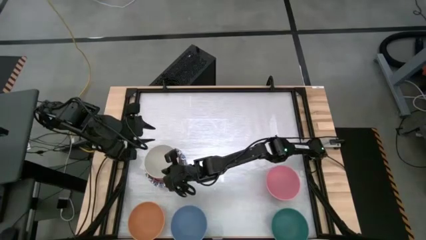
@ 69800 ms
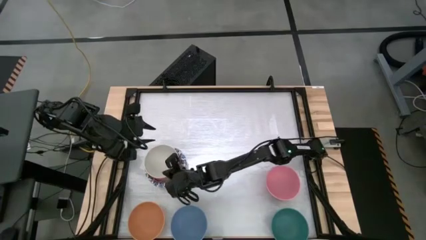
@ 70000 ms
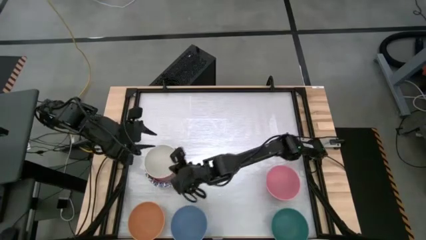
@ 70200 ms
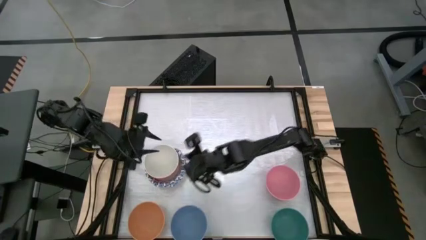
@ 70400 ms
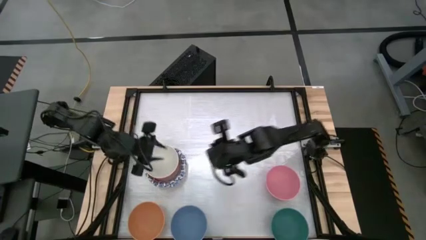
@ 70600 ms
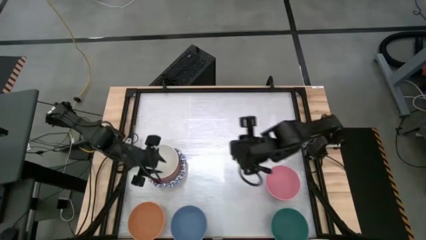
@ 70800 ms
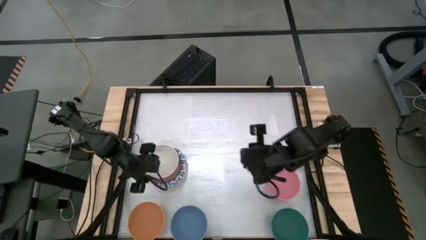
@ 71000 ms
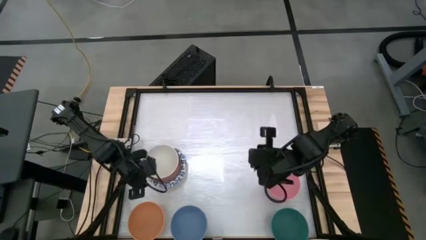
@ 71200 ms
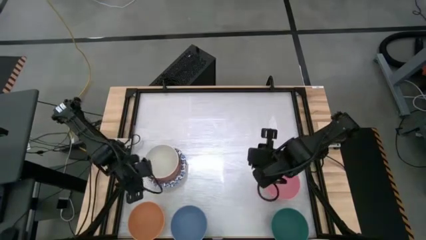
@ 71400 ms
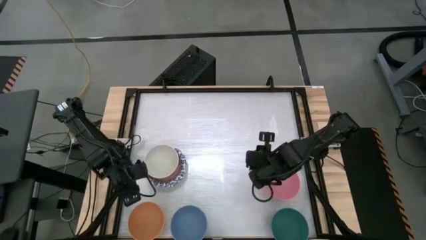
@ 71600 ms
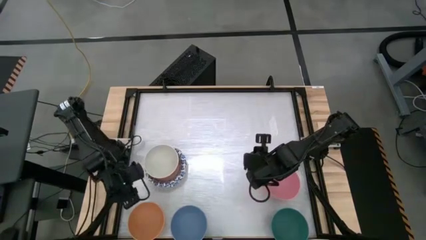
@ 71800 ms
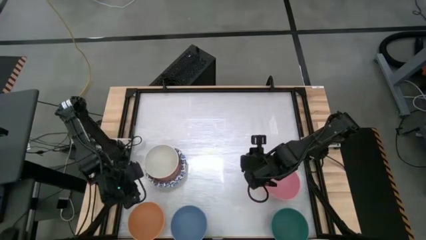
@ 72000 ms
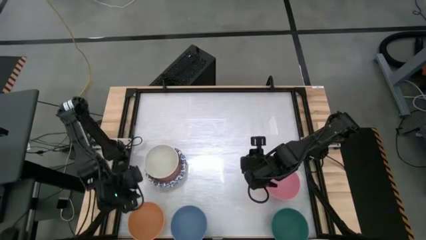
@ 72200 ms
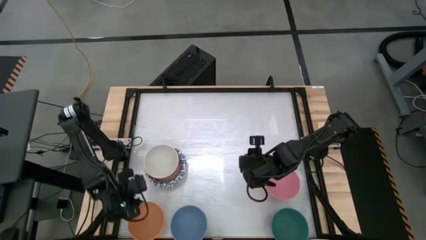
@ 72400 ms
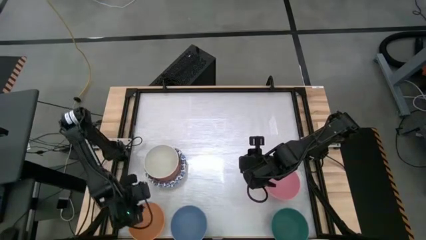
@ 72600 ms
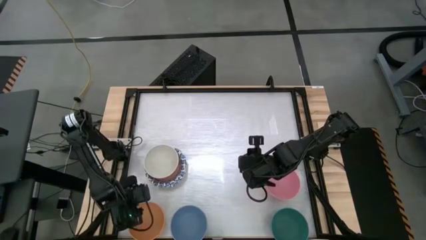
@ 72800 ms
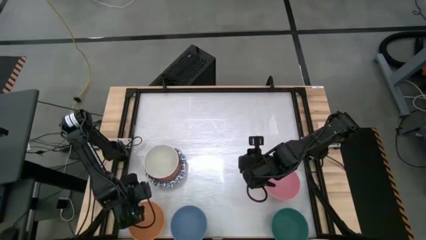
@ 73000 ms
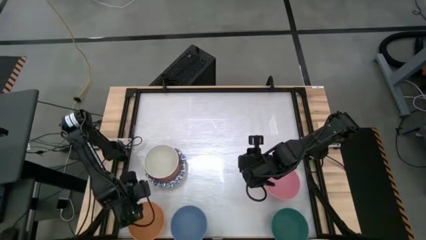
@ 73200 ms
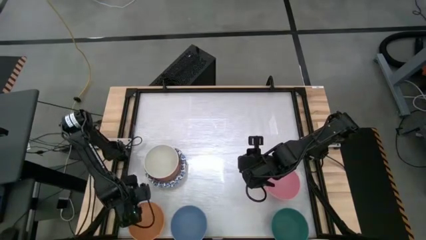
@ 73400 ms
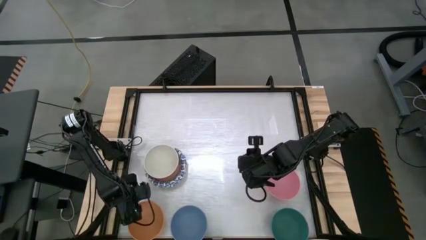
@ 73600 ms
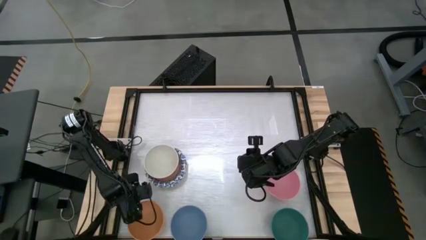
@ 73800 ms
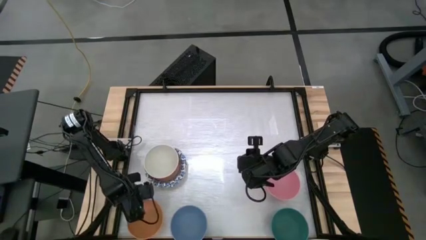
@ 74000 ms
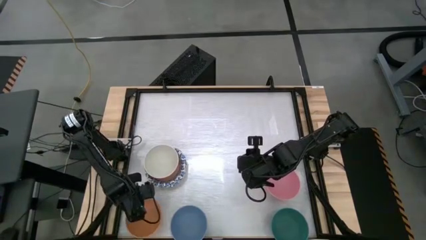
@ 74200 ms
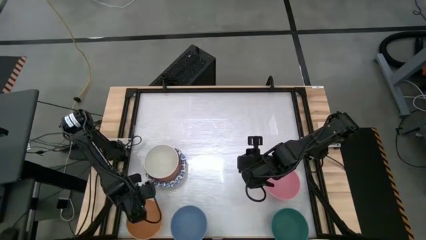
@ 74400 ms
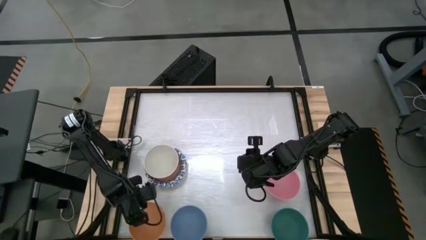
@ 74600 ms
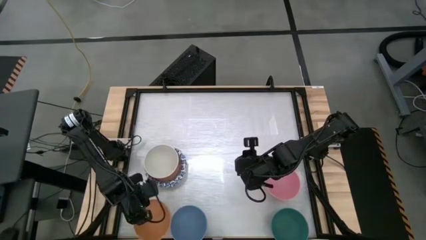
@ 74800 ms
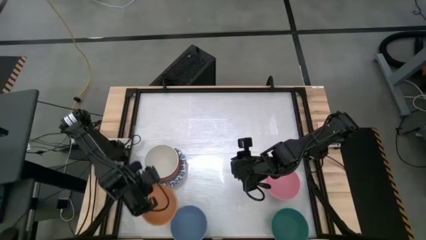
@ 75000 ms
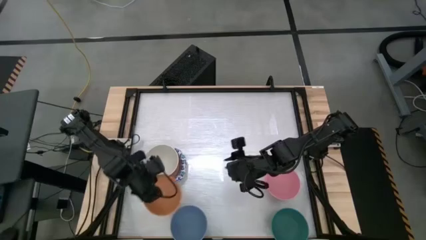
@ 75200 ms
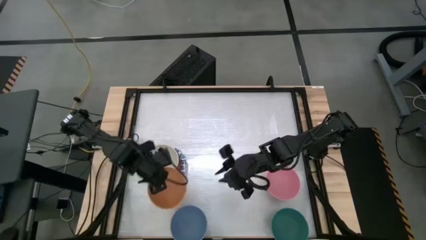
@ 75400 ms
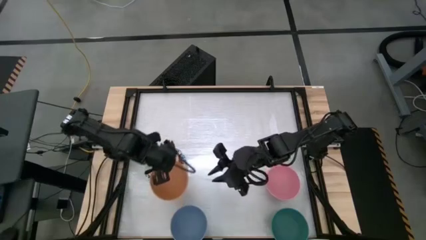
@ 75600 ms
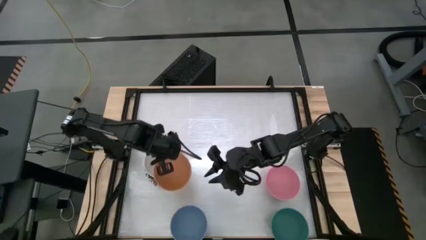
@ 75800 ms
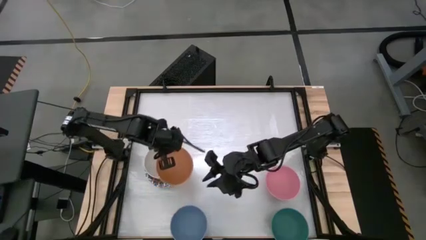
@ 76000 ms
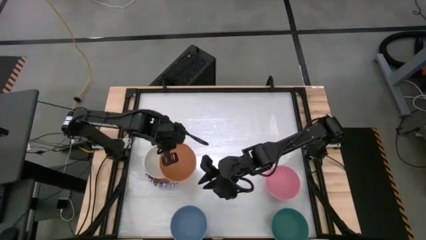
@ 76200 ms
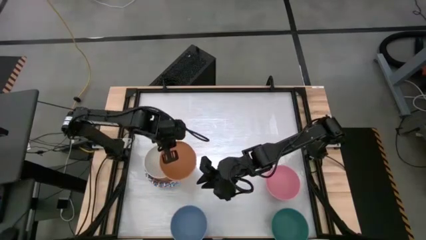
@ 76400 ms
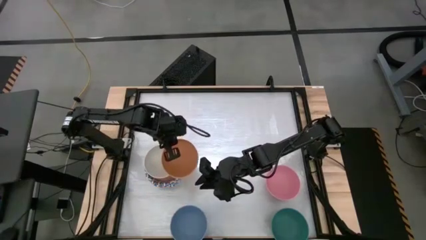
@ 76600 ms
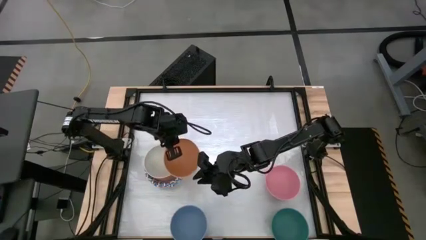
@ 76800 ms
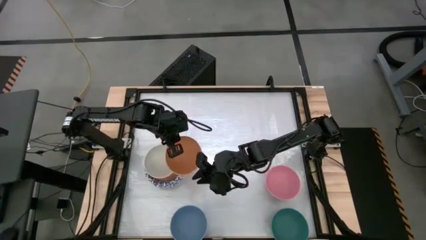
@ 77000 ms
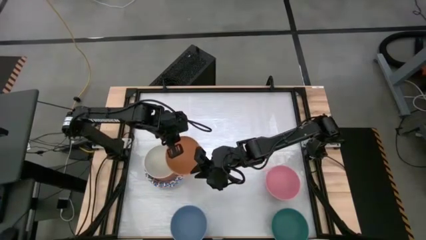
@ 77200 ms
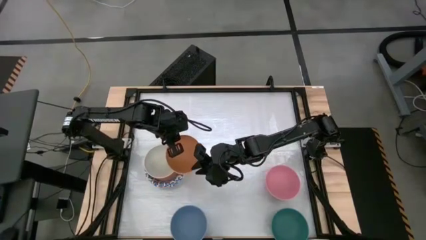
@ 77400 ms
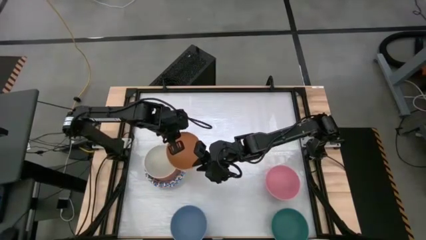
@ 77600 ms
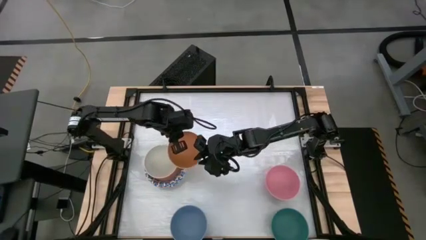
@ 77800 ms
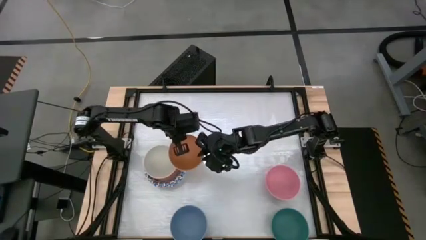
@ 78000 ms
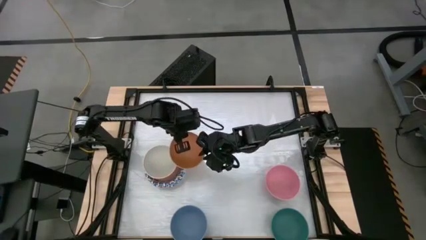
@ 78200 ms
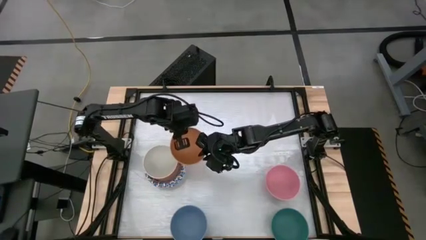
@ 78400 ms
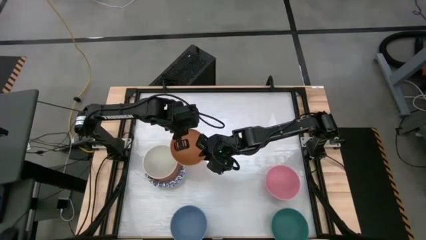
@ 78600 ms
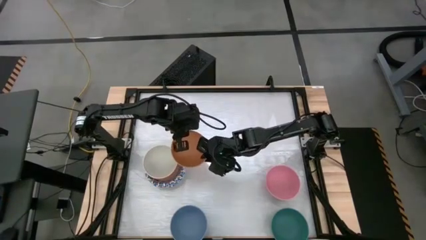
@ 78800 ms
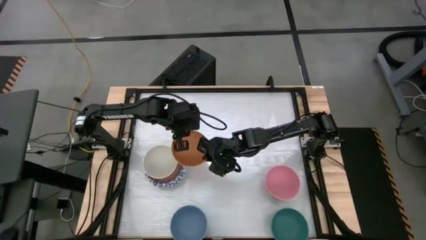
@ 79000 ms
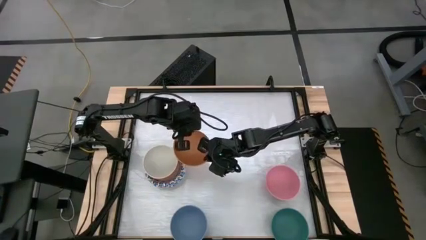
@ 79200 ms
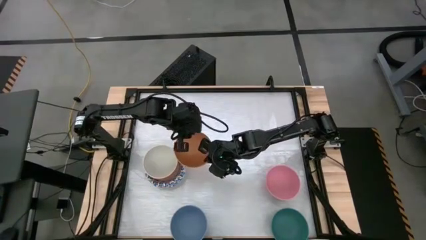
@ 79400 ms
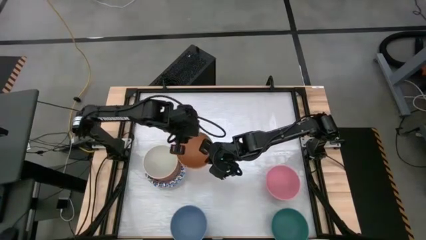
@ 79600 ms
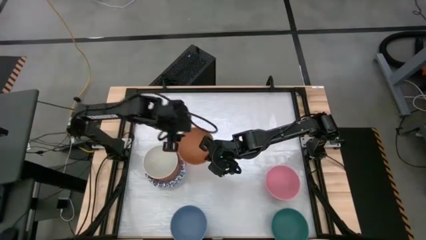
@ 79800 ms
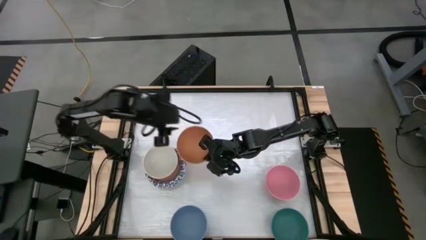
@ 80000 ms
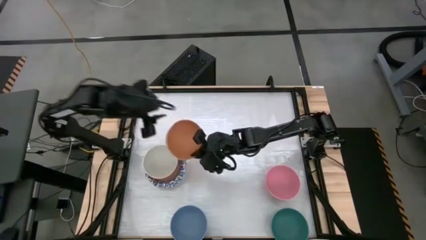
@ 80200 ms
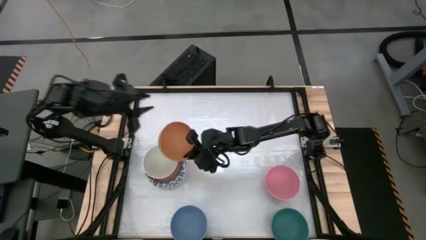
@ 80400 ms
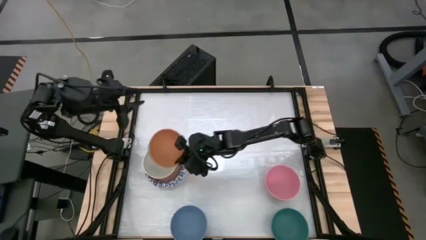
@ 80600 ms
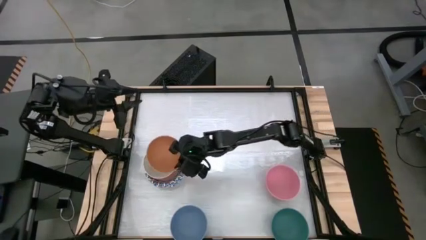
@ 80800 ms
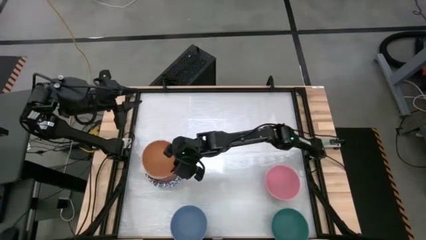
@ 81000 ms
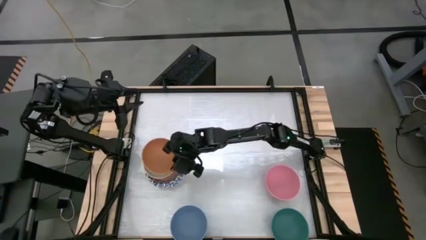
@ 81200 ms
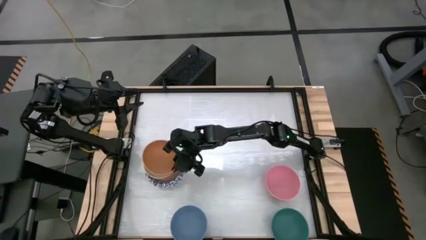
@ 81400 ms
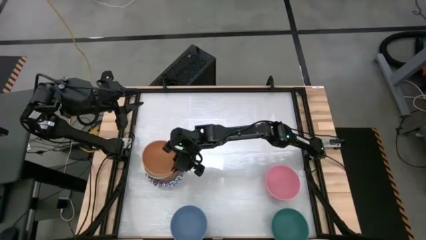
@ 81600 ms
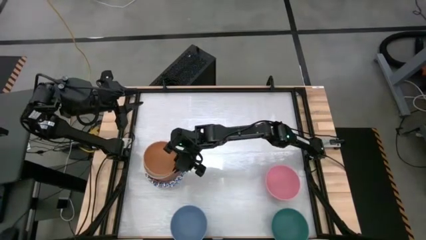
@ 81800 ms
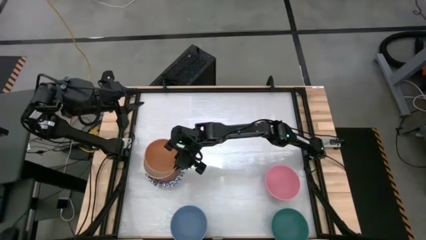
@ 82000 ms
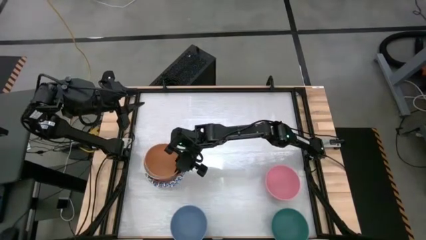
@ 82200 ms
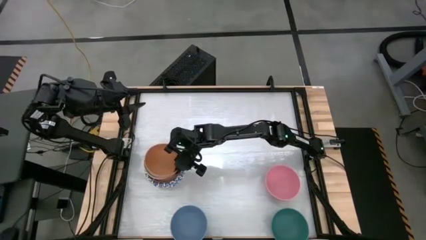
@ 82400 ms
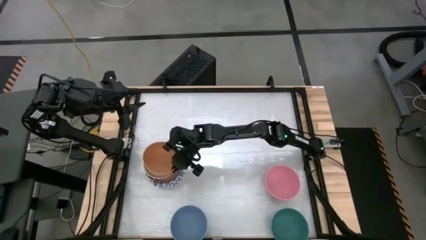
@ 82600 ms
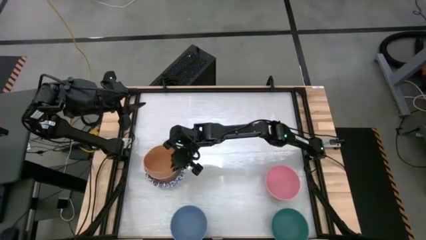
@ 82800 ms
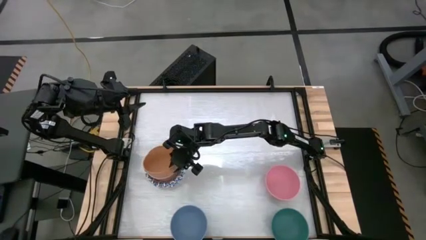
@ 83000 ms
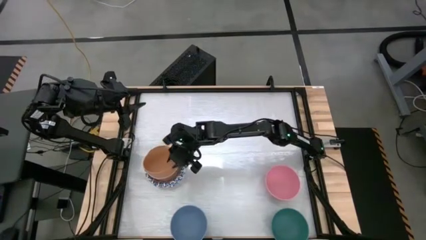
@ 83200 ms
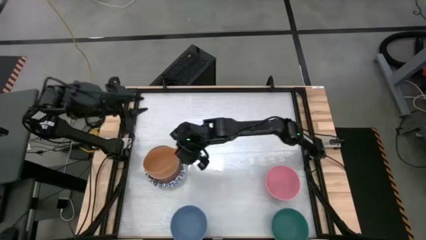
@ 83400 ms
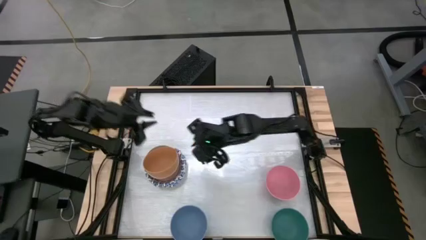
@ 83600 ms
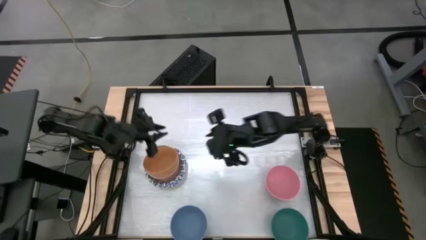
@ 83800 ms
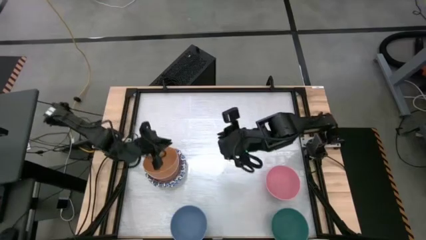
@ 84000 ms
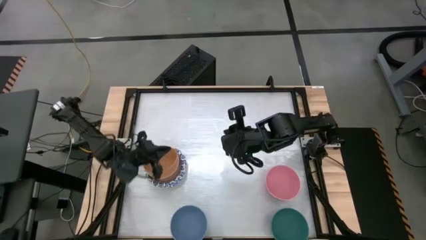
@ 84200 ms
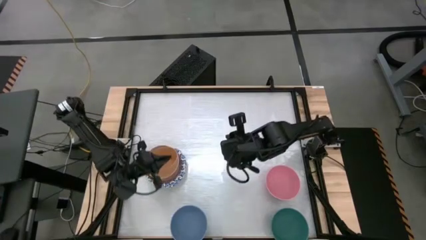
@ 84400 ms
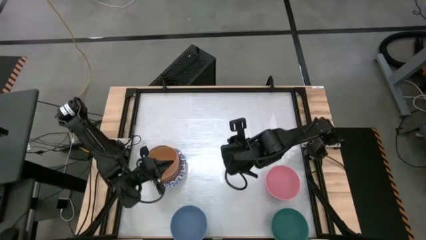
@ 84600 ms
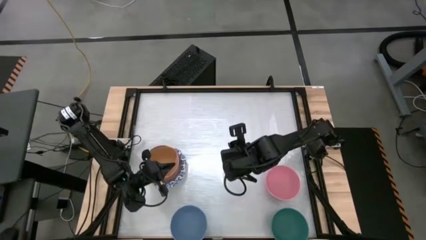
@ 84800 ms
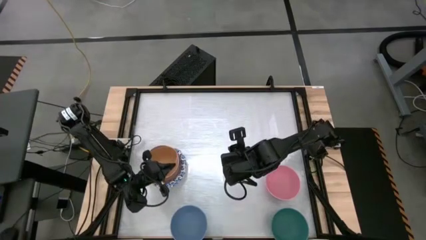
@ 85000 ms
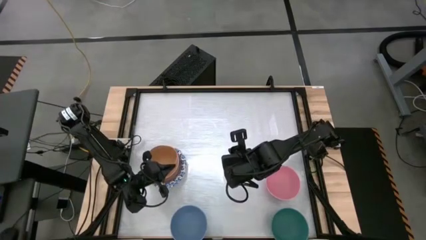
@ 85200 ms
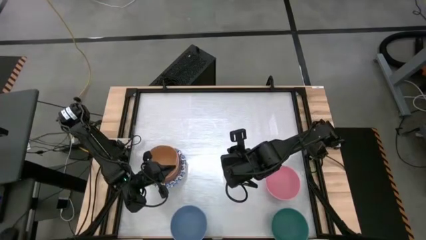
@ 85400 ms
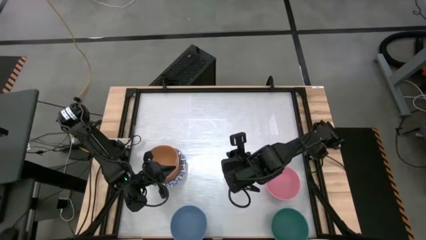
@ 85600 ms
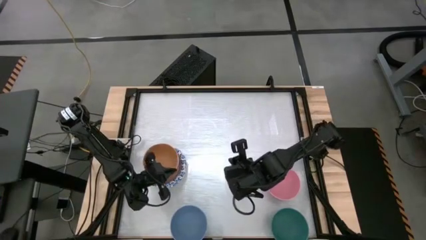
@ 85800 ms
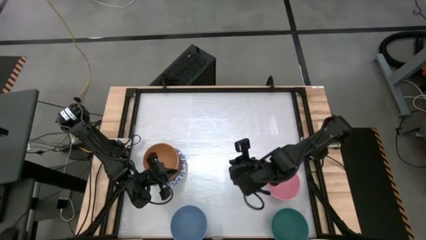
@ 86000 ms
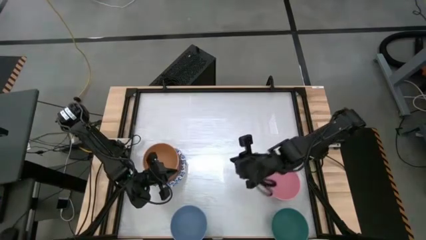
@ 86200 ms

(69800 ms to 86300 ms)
Stack the light orange bowl into the white bowl
